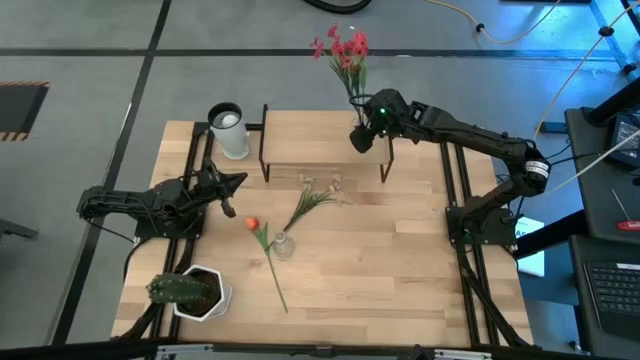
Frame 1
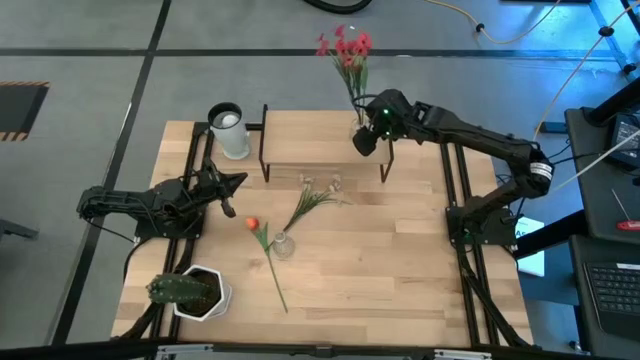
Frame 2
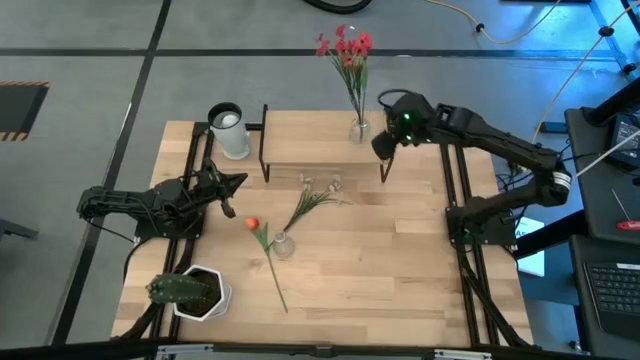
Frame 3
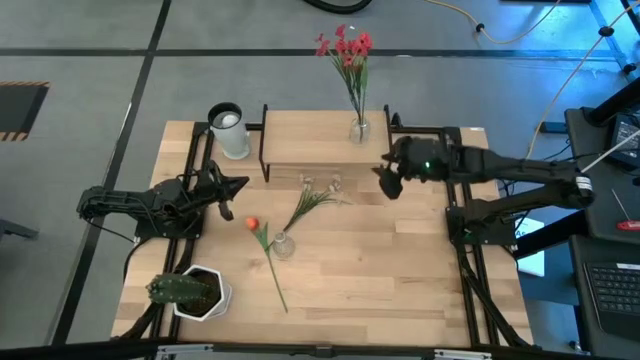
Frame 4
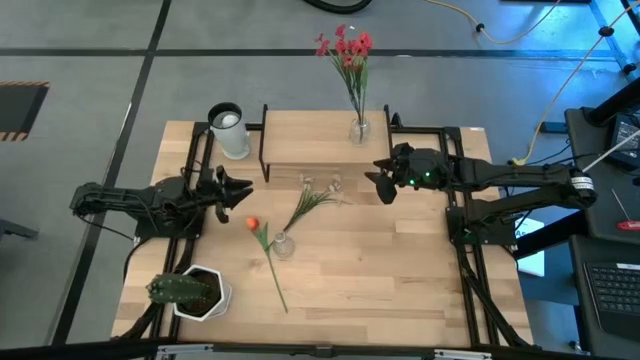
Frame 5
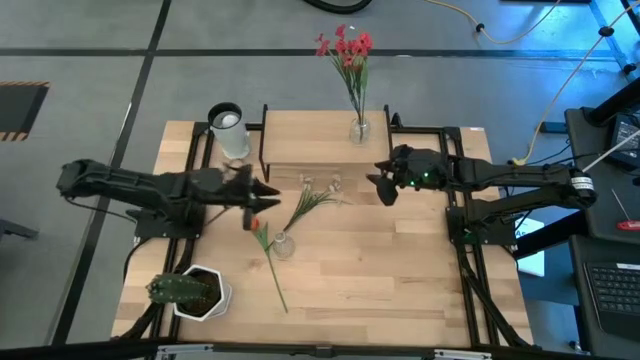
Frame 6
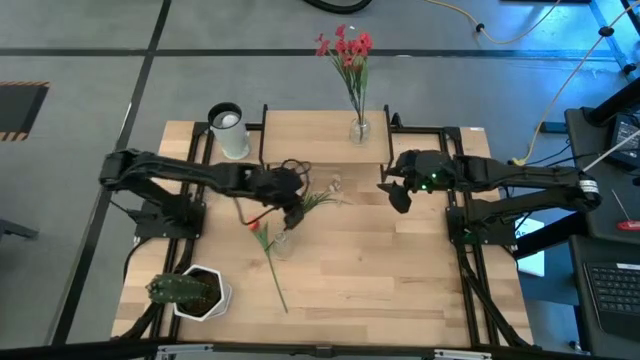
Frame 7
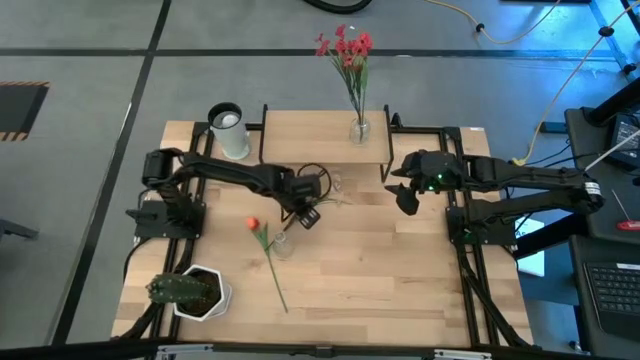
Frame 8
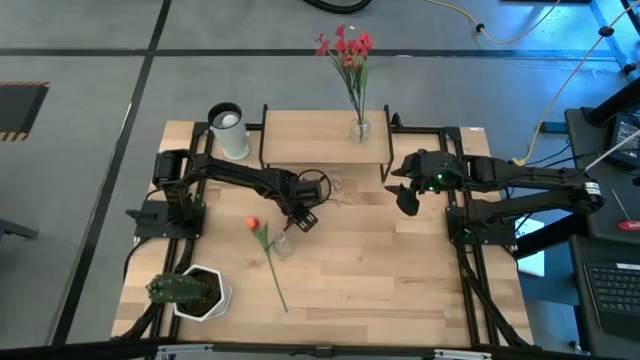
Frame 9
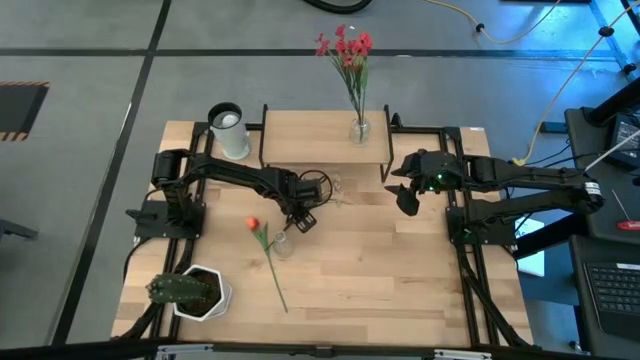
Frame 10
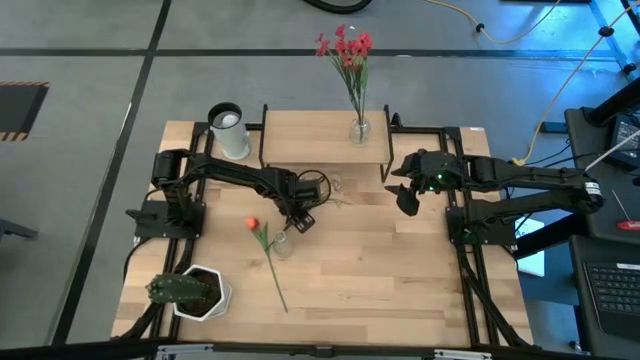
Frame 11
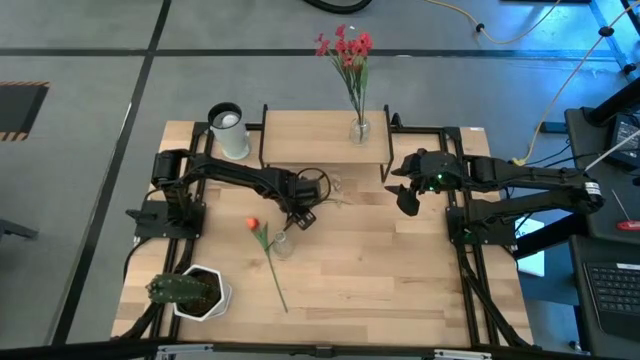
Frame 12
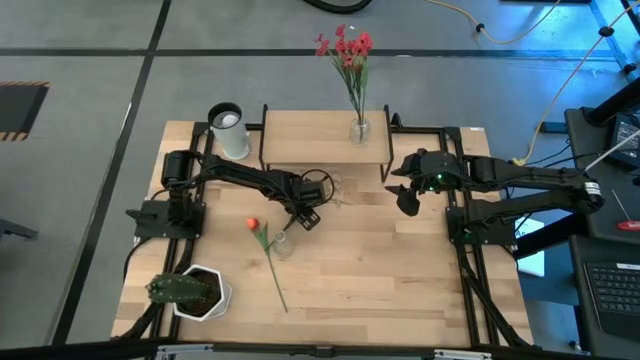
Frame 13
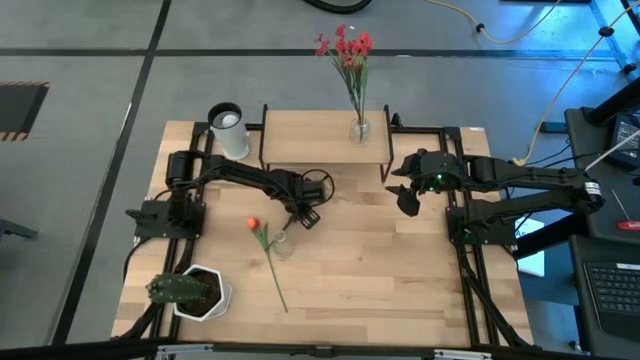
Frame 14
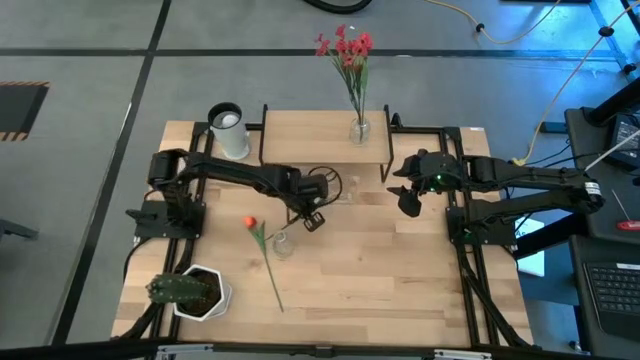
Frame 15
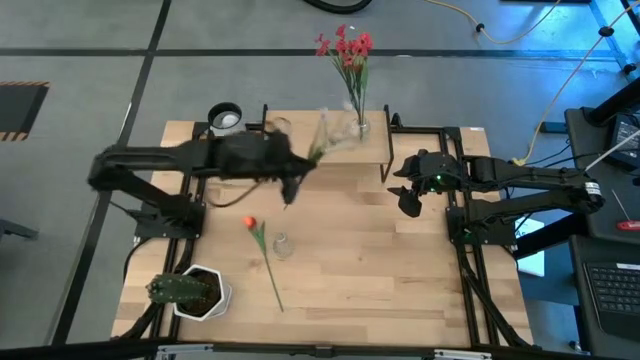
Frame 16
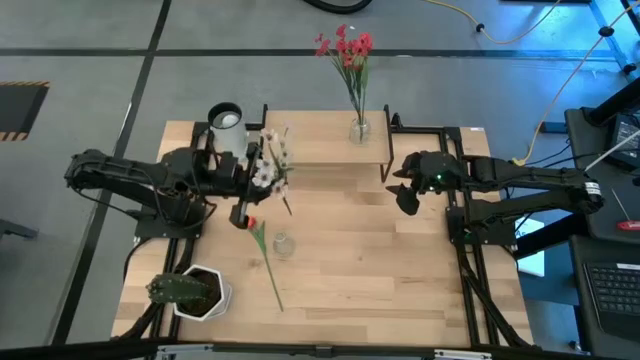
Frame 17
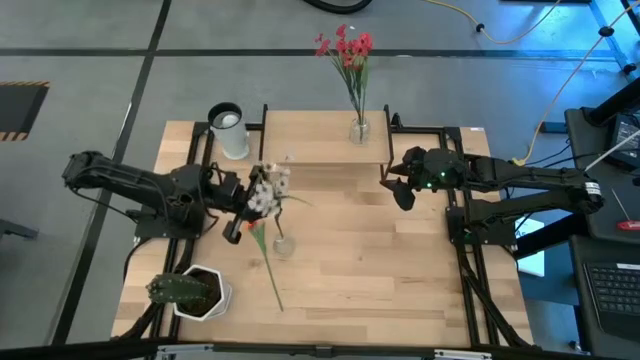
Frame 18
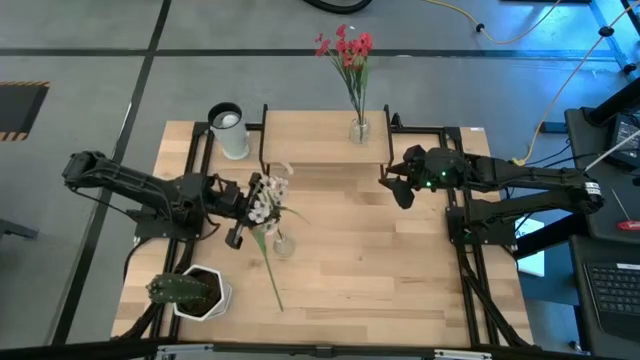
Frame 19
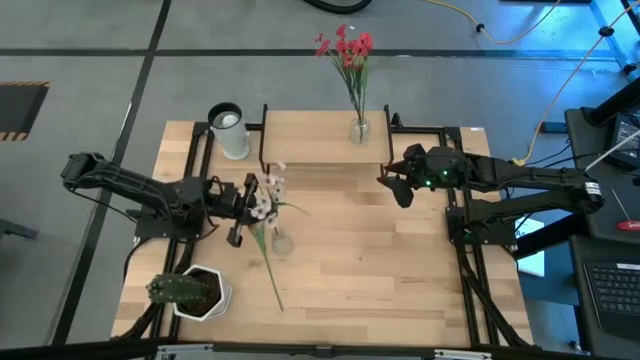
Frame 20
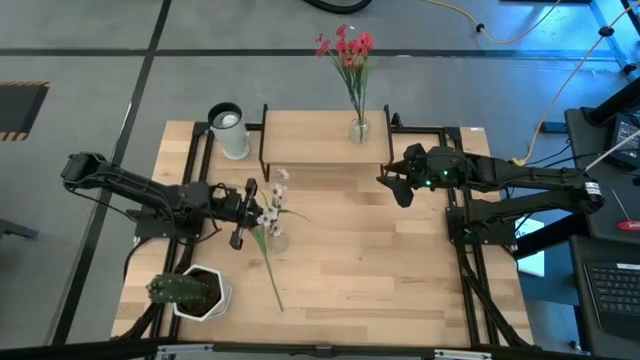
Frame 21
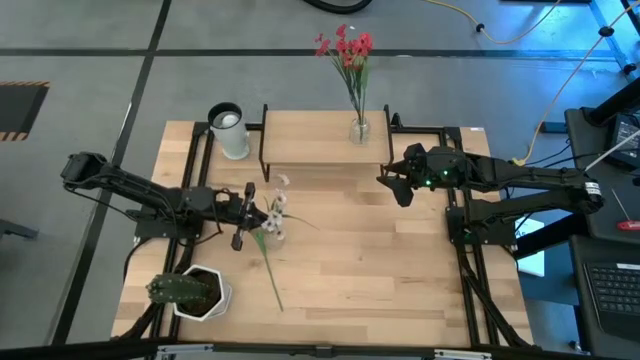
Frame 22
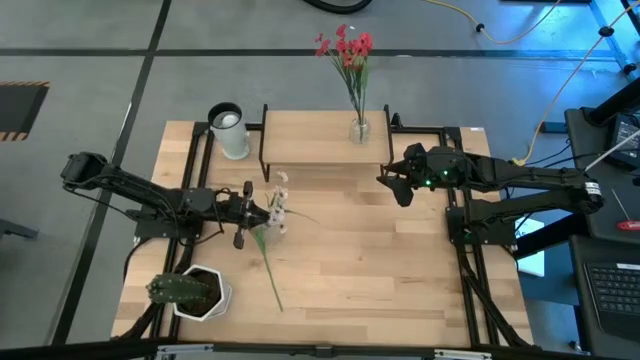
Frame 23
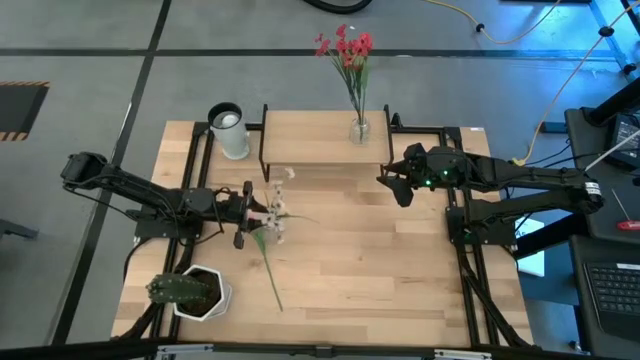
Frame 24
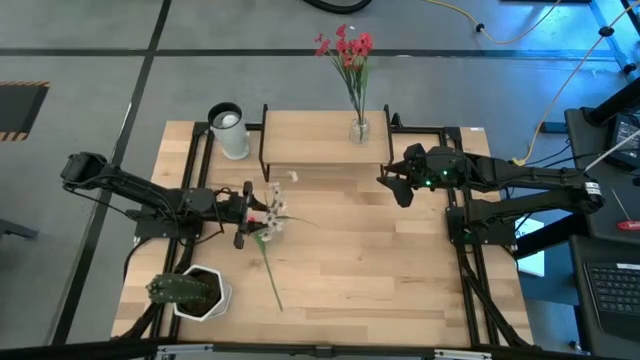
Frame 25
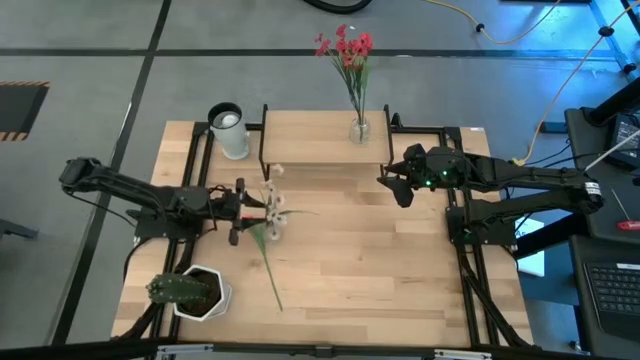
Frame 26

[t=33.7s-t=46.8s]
Task: Pick and place flowers into a vace then onto a shelf
Put the white flowers into the transparent vase

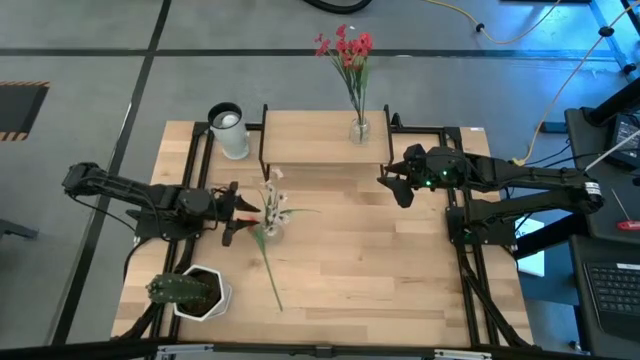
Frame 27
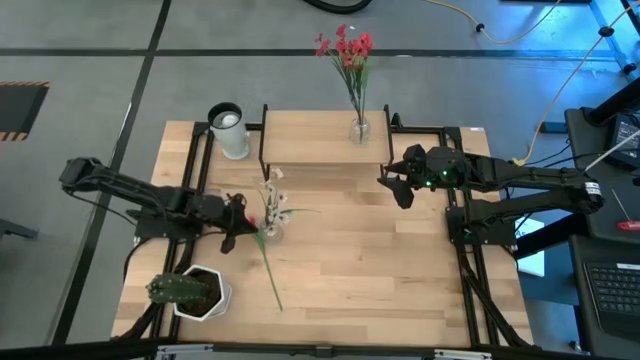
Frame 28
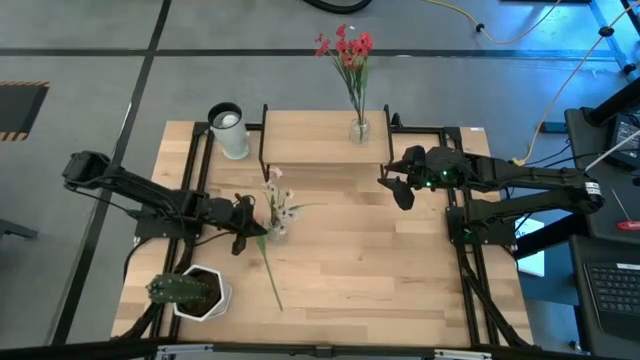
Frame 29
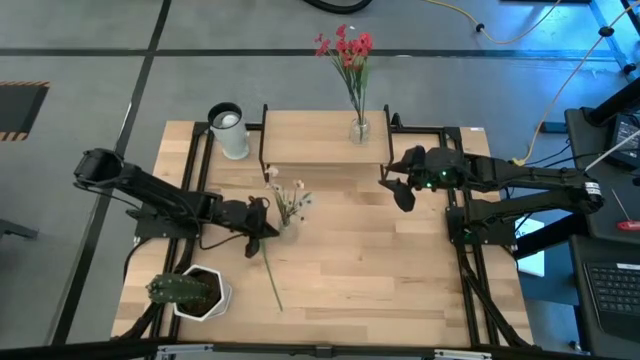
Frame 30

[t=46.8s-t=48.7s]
Adjust the transparent vase

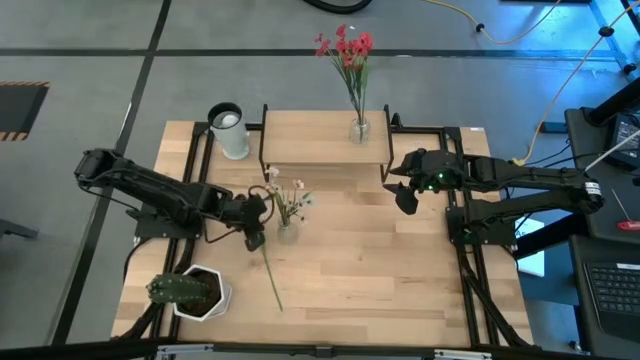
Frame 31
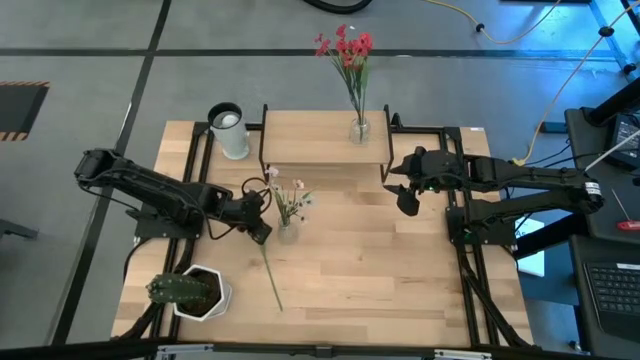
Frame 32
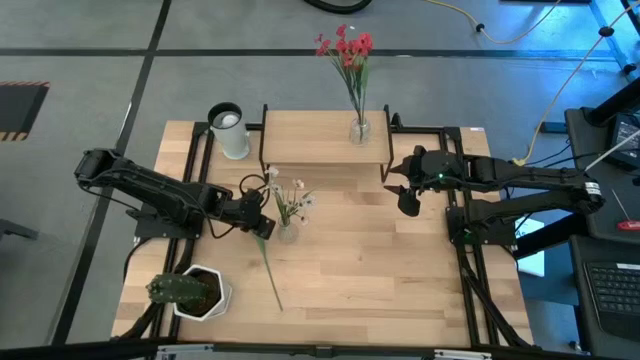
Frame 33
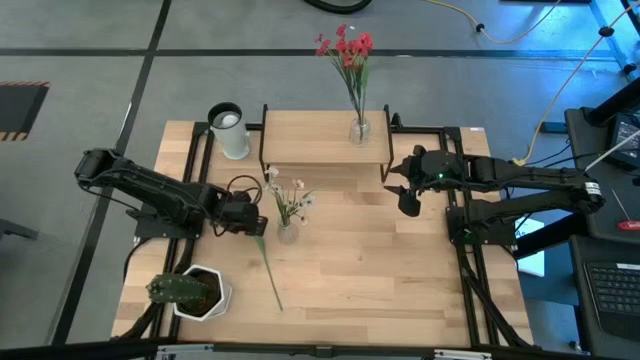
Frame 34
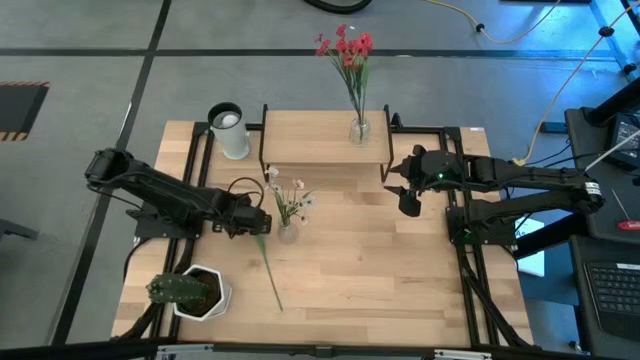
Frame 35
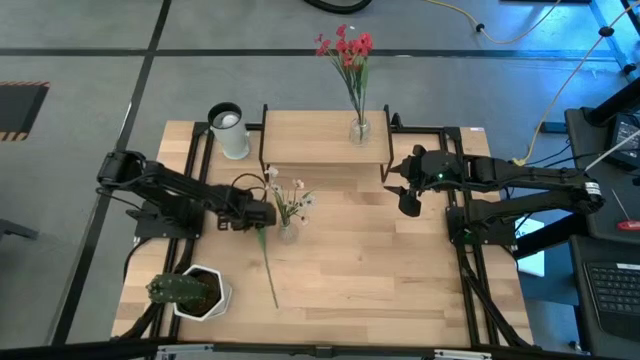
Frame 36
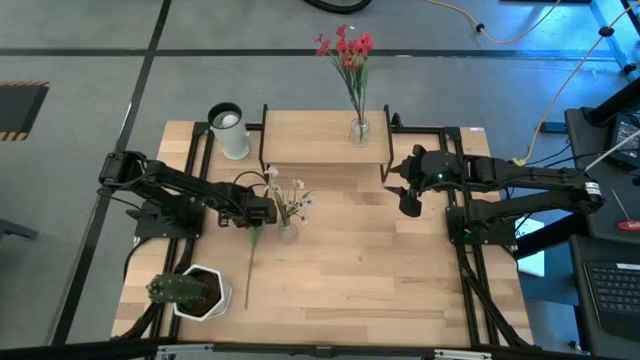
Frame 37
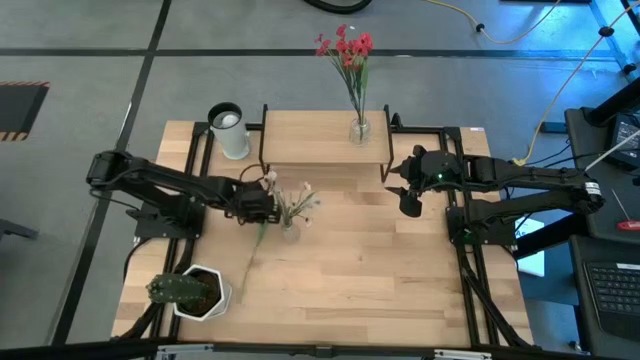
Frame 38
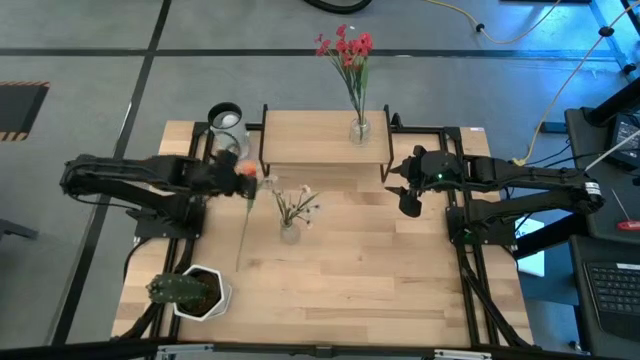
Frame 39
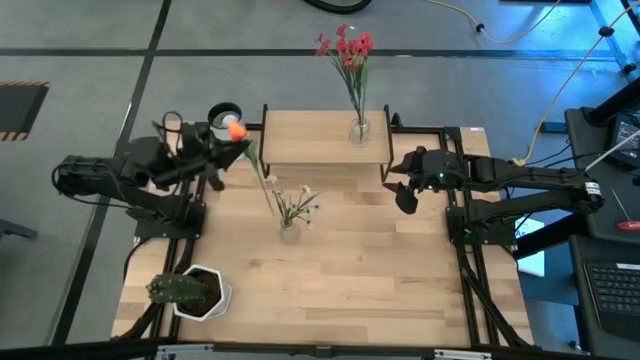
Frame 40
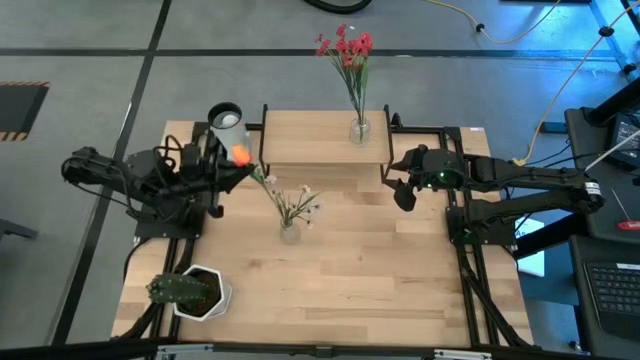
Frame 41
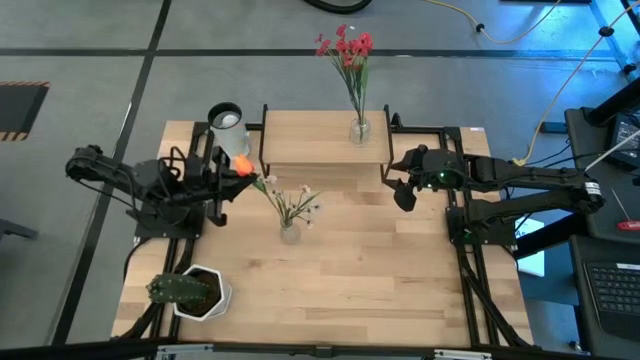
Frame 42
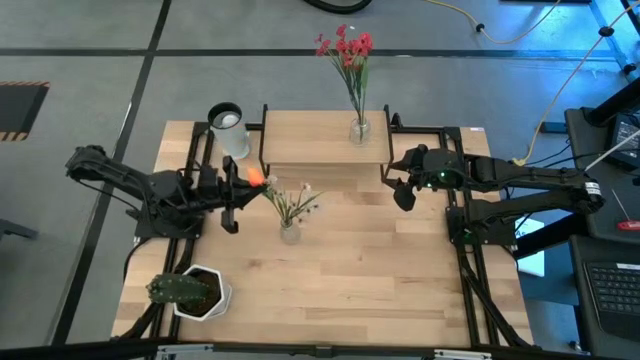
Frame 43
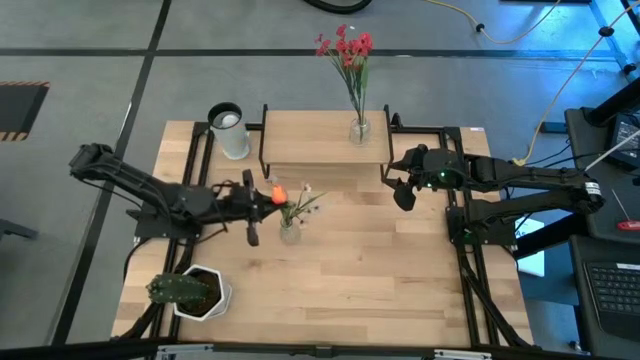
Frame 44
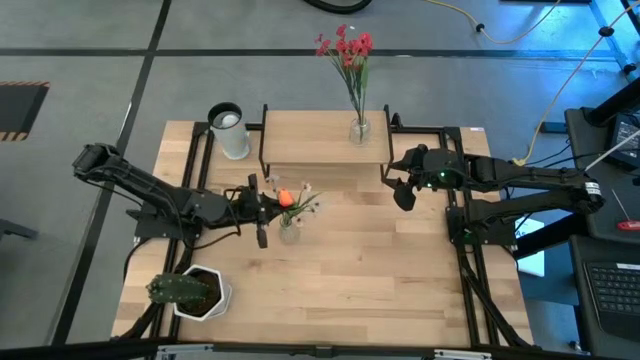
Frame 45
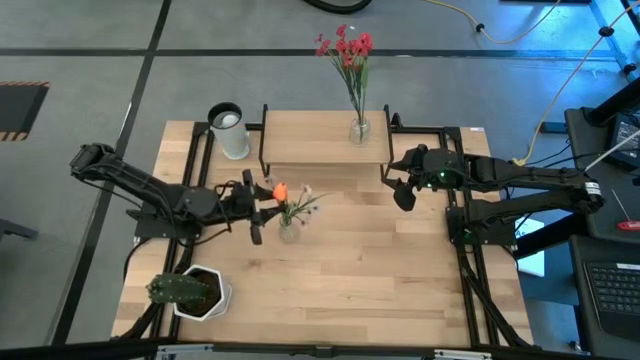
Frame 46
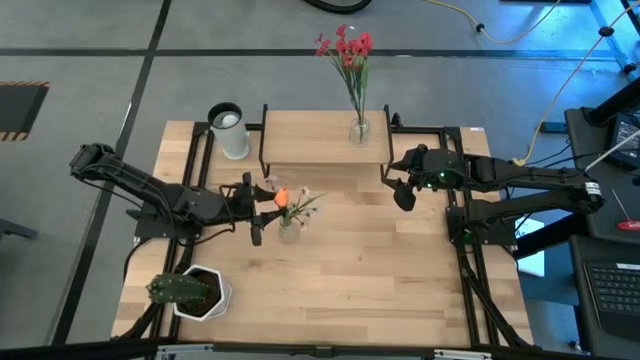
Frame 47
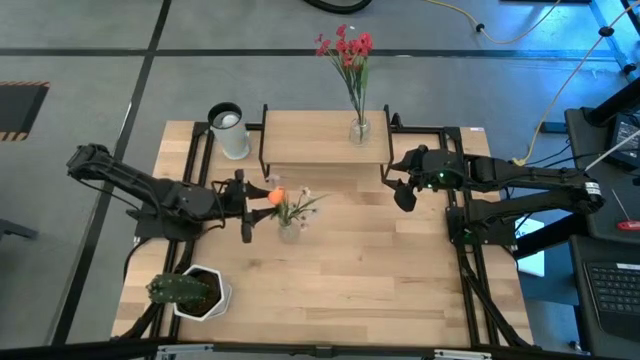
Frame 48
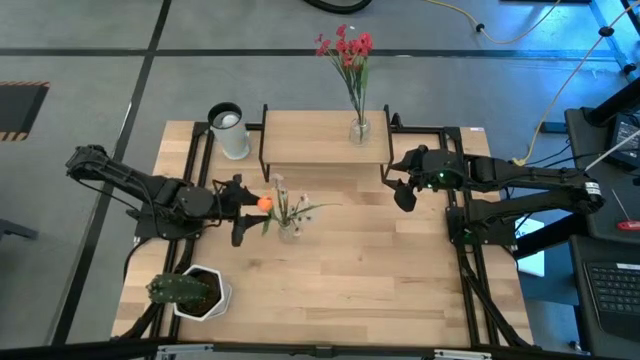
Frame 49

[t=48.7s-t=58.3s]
Put the orange flower into the transparent vase
